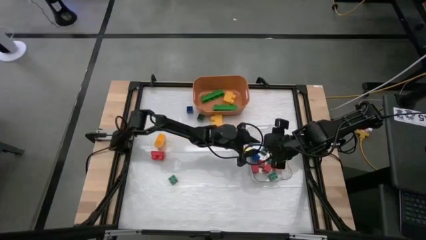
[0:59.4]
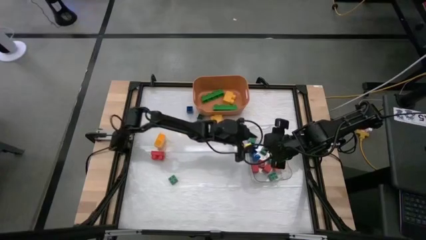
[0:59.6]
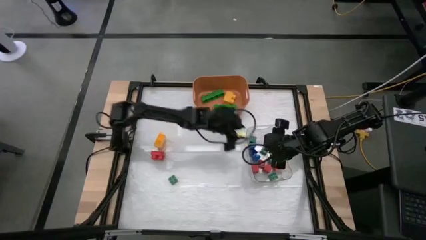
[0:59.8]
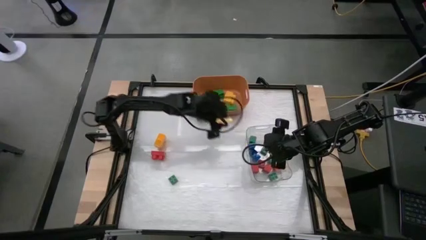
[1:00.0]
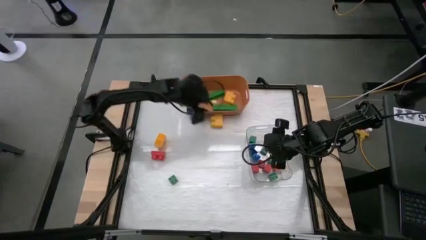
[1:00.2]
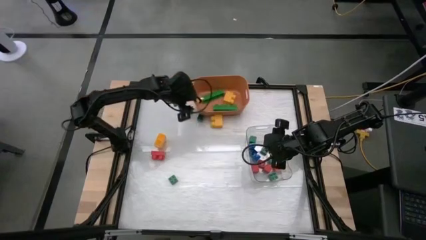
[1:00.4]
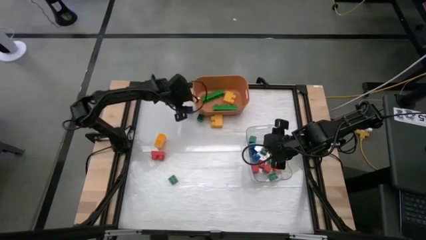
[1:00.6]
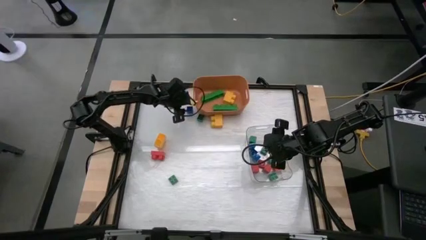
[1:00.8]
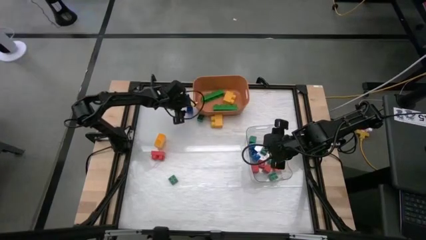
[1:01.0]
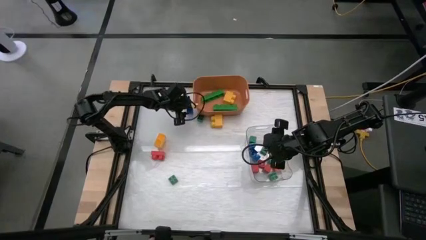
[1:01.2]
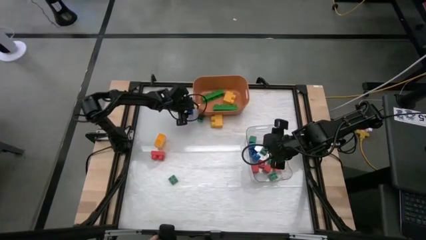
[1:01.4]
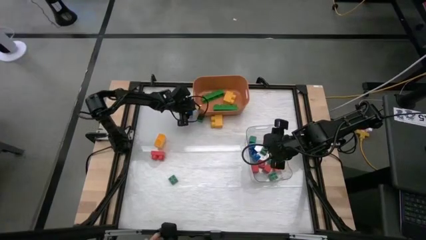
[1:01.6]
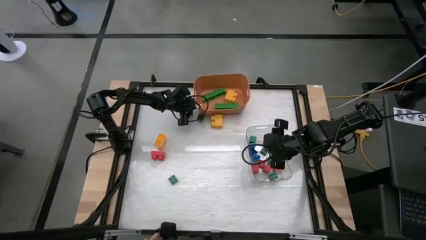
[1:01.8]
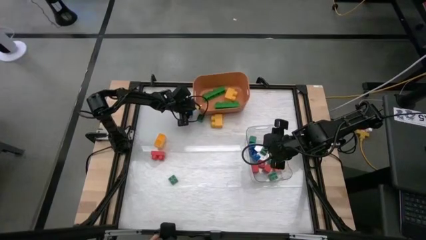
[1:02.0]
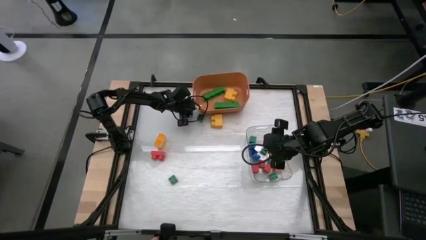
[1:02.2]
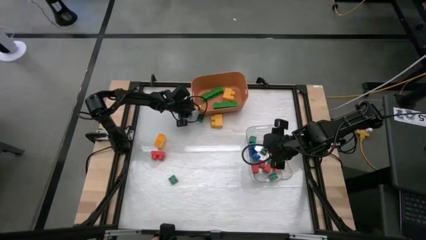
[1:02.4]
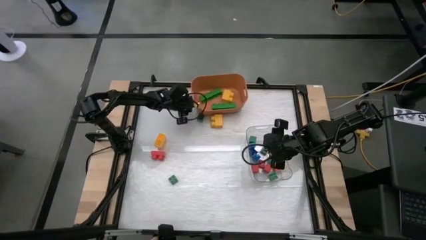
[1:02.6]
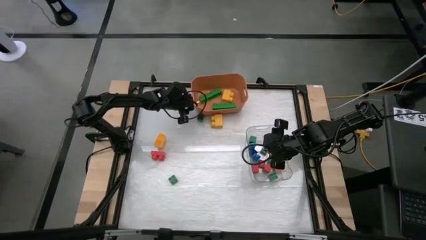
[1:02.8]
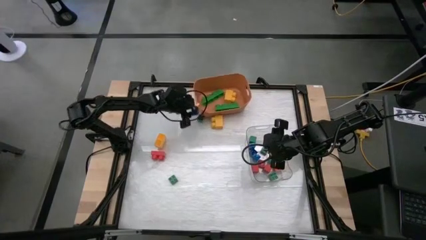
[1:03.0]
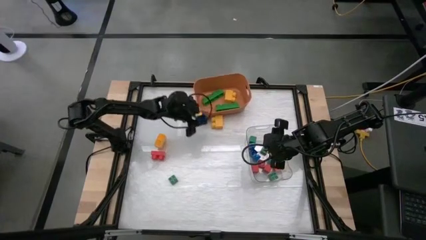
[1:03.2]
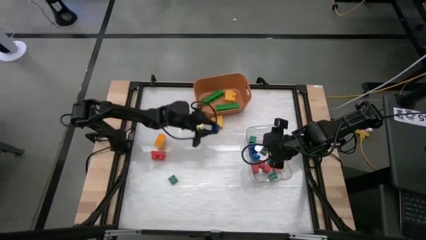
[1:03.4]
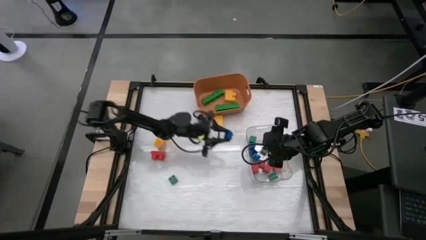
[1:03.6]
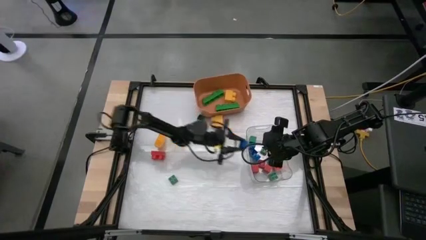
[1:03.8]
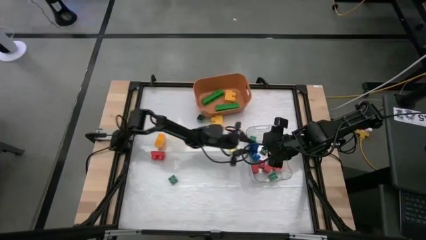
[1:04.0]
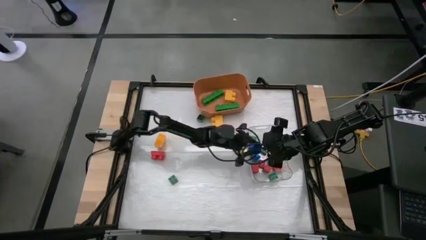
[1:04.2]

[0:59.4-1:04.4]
Task: Sort blocks by size
Put the small blue game piece into the transparent bin

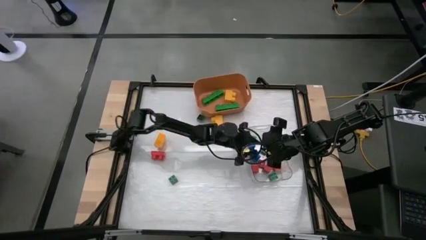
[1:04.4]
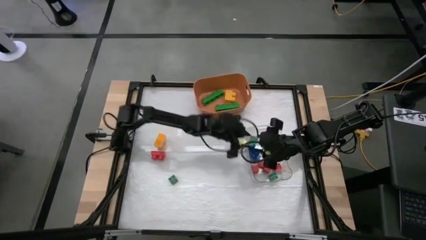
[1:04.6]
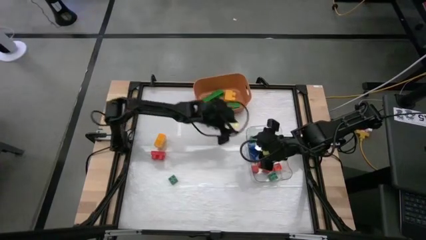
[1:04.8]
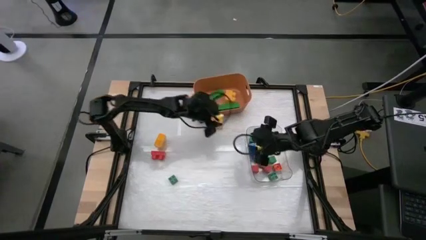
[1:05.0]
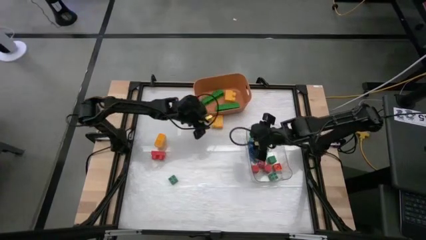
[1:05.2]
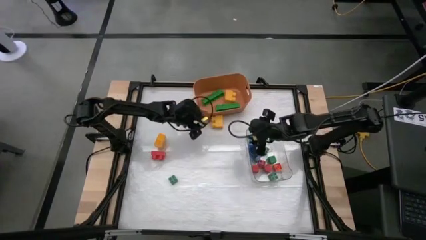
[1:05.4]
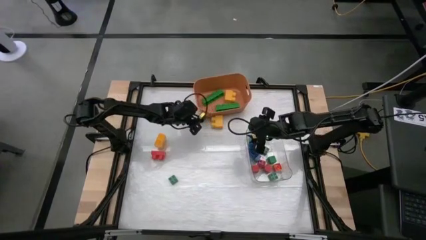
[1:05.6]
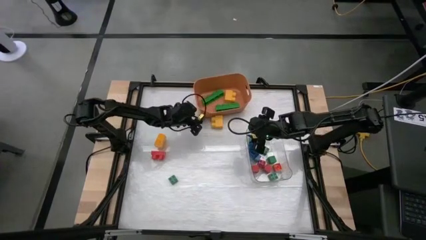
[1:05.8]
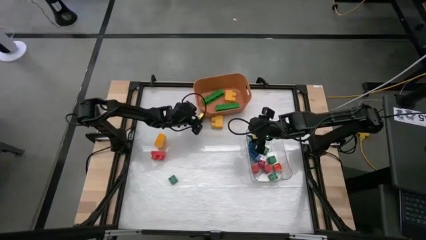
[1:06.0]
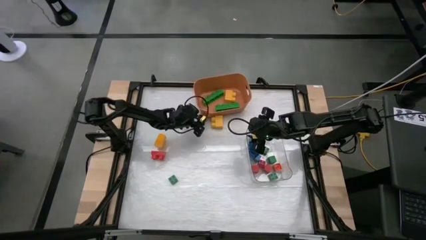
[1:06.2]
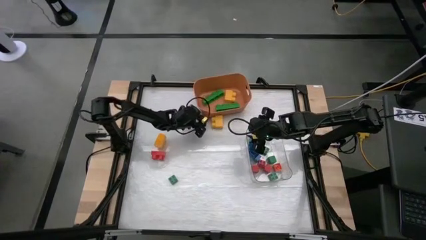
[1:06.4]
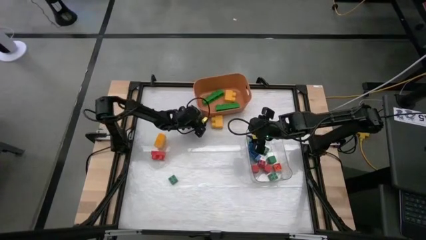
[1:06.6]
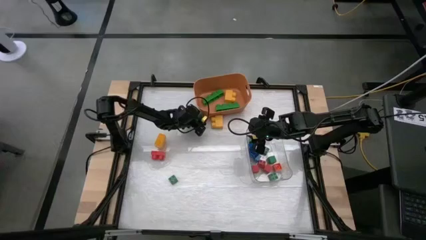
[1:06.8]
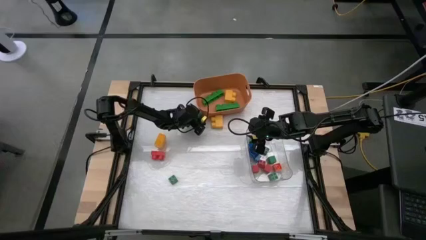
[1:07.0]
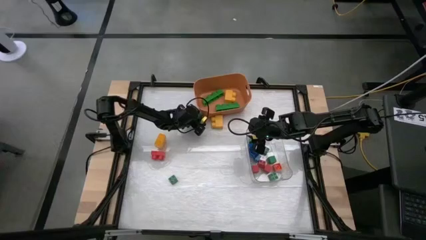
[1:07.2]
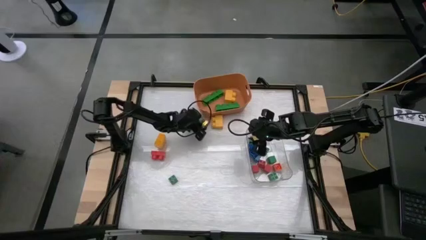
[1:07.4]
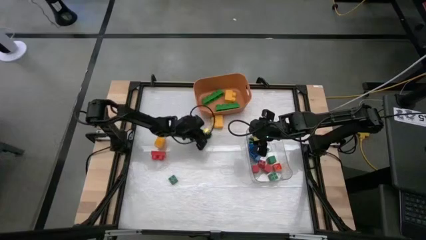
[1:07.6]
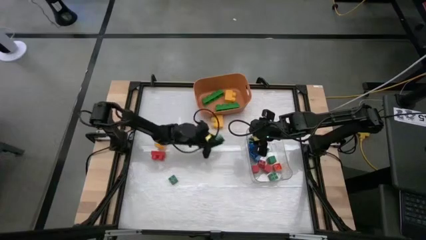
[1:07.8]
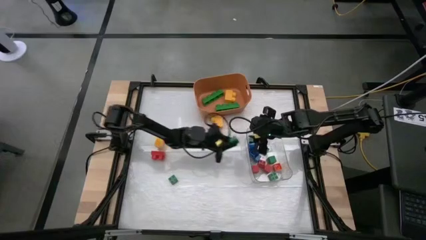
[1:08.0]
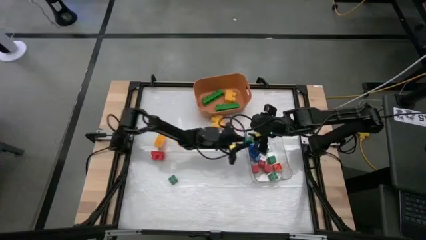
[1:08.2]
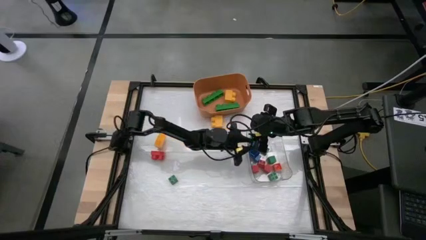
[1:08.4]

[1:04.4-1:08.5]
Put the small blue game piece into the transparent bin

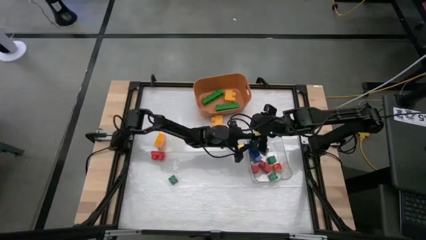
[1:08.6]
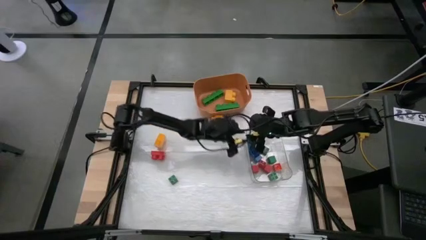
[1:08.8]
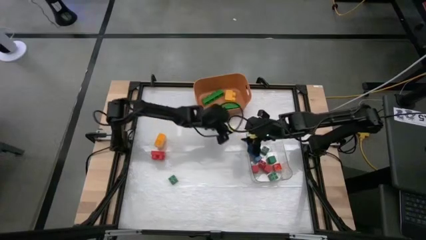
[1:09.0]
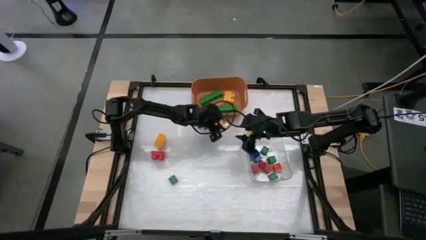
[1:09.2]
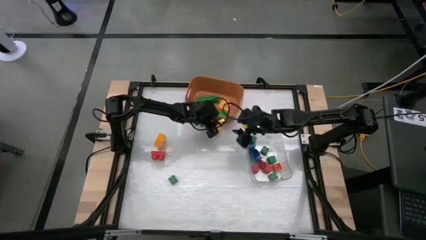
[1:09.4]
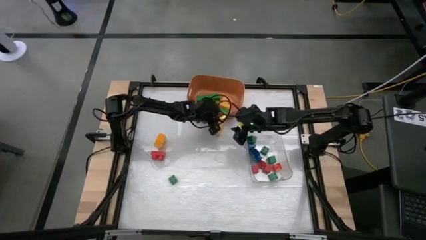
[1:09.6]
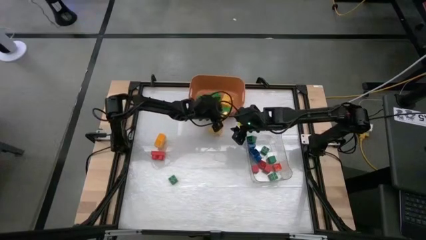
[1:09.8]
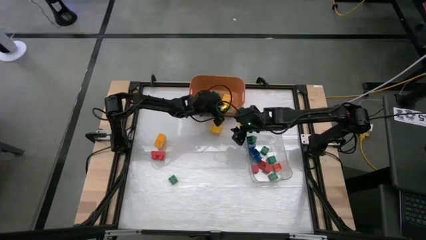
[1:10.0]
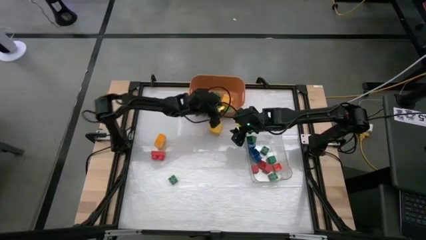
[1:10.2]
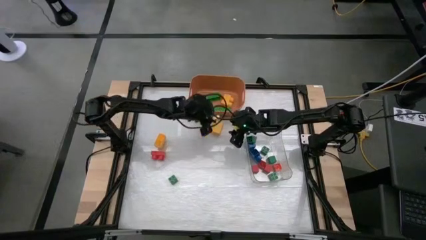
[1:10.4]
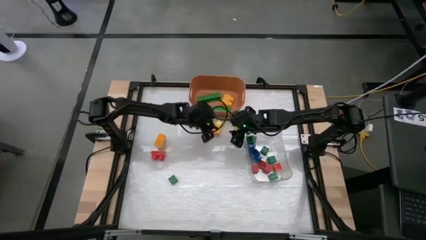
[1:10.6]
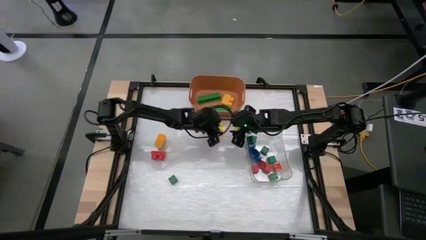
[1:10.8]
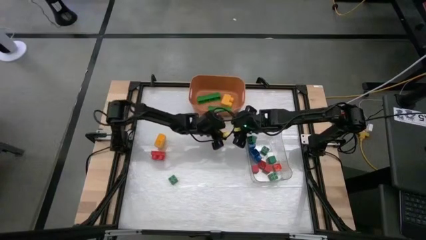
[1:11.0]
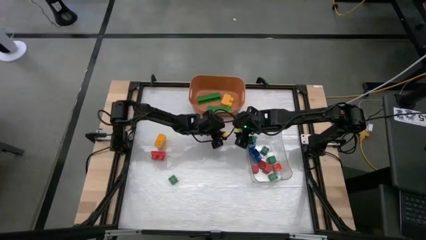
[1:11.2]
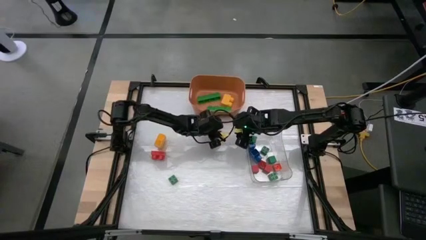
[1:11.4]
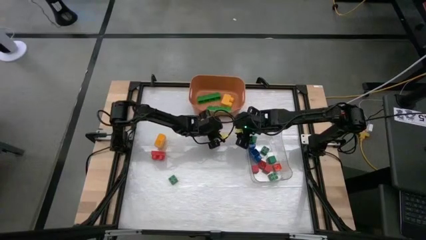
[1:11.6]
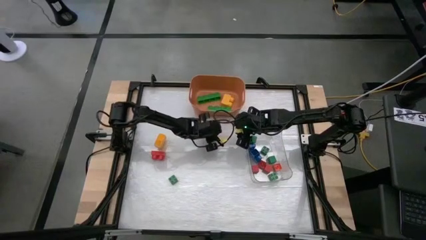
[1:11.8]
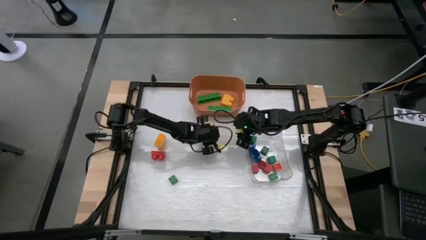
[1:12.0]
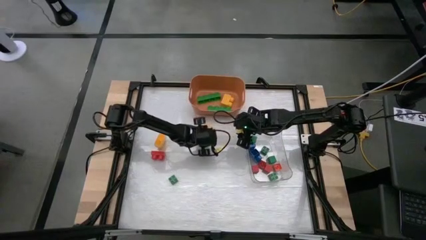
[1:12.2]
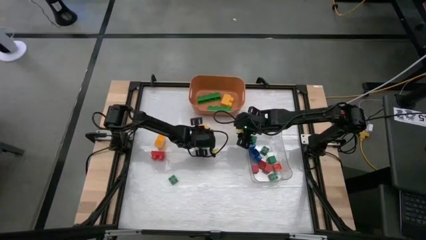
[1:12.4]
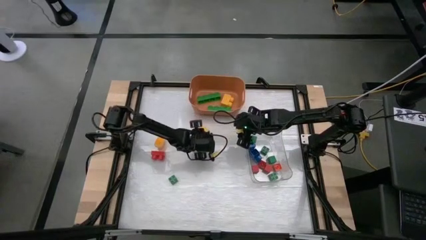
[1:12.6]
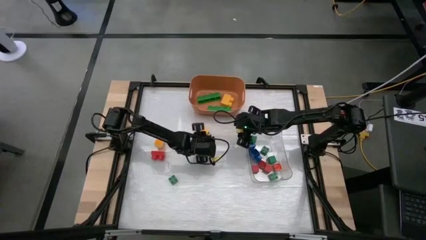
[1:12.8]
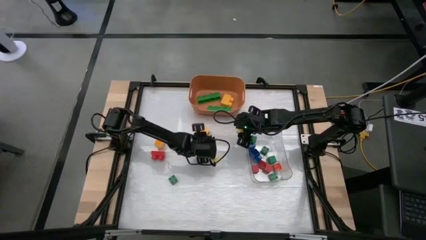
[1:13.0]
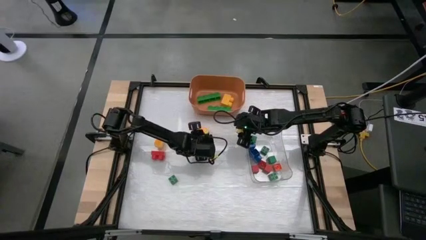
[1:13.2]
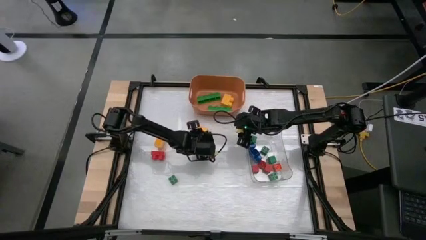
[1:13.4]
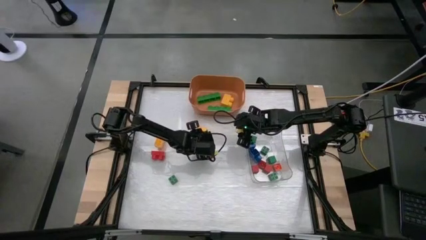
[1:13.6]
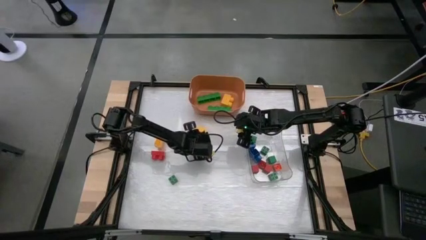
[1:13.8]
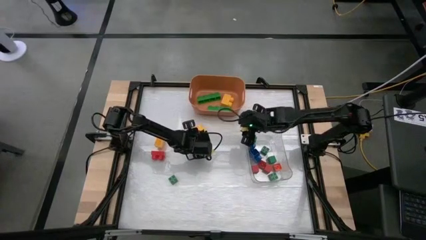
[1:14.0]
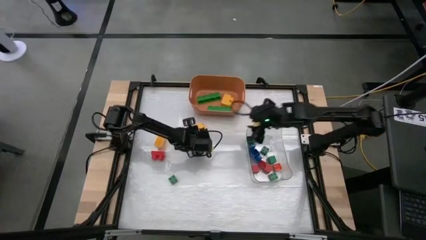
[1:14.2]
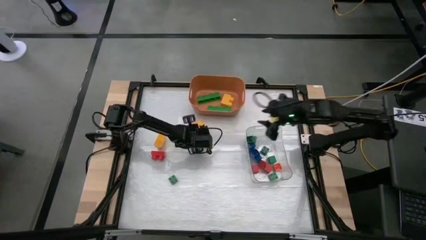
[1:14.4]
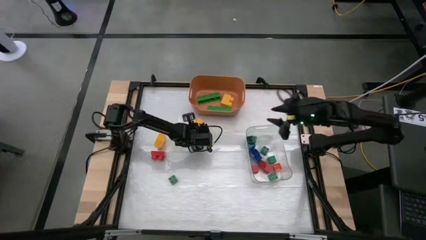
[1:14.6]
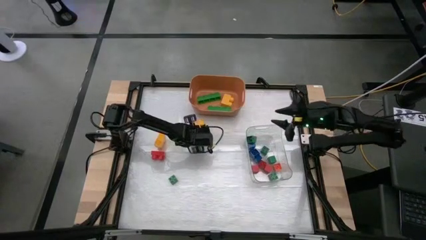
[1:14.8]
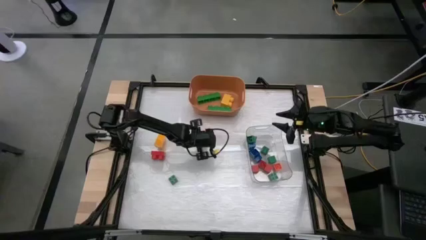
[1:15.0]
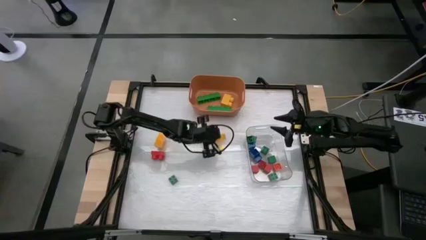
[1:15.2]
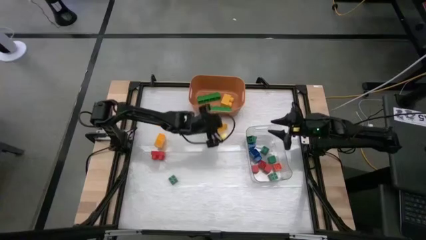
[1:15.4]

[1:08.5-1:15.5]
Put the big yellow game piece into the orange bin

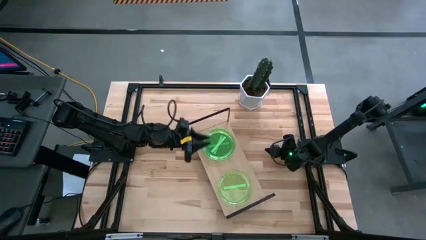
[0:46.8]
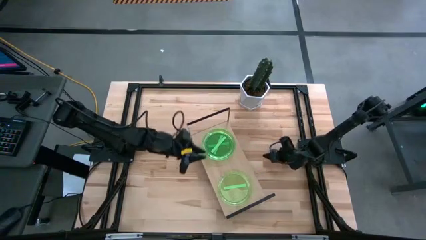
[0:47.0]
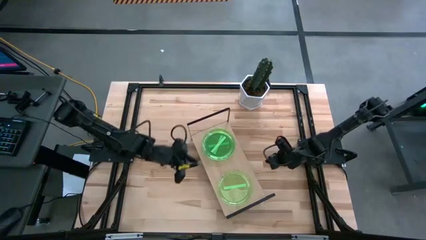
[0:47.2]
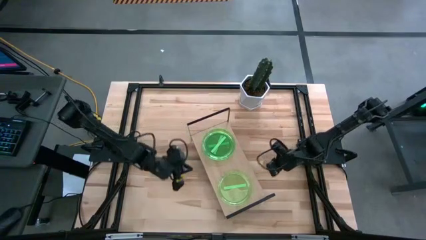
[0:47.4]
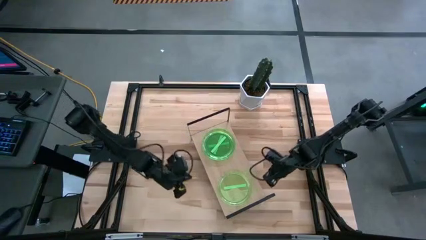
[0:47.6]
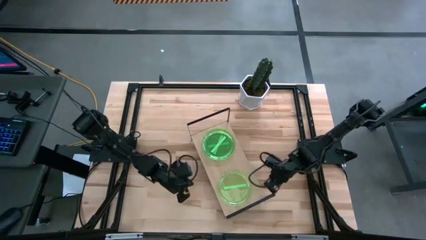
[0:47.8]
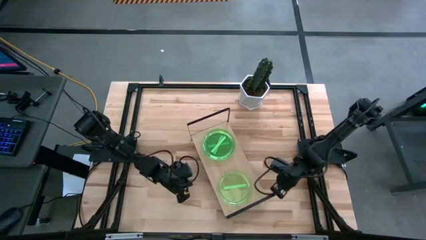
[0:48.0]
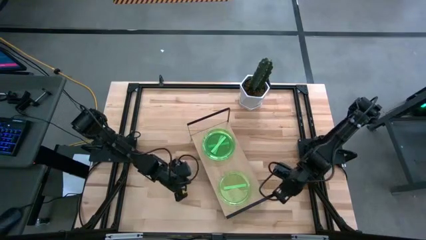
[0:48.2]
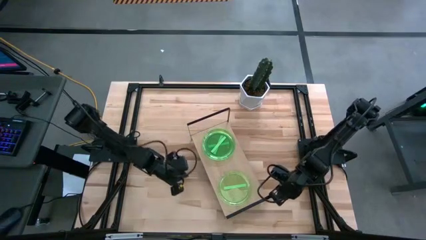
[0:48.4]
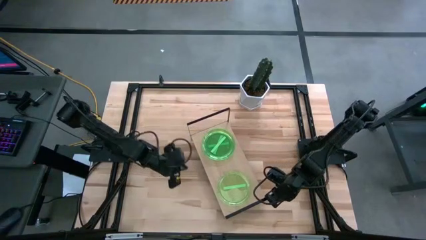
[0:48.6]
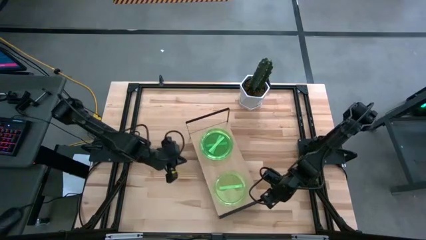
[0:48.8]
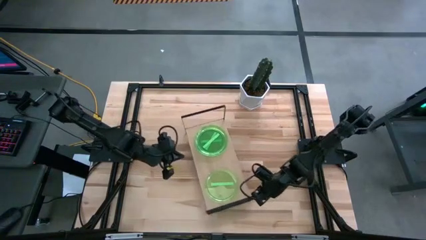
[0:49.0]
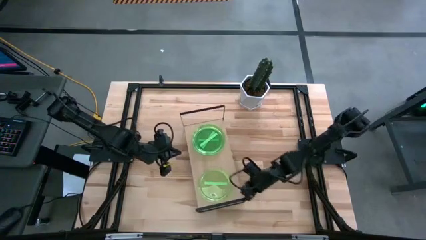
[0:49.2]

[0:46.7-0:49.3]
Task: Place and stack plates onto a shelf
Adjust the shelf
